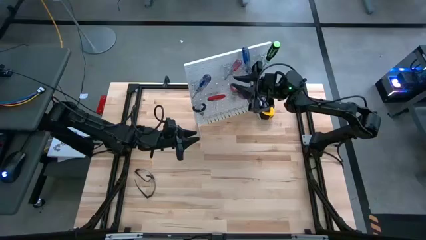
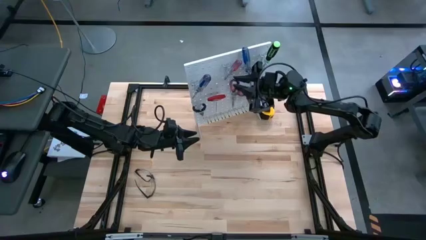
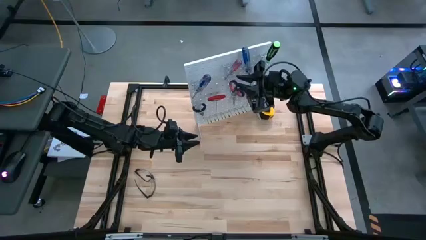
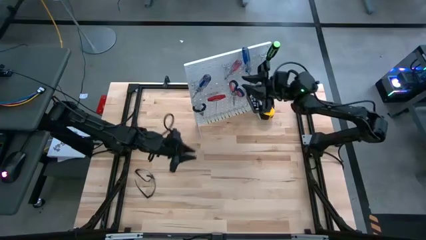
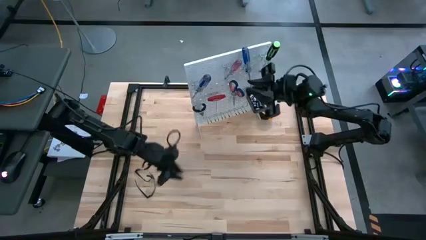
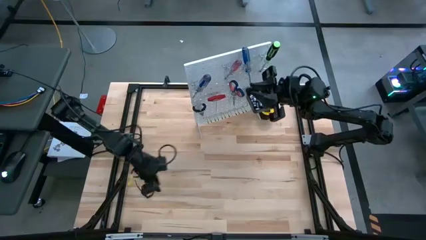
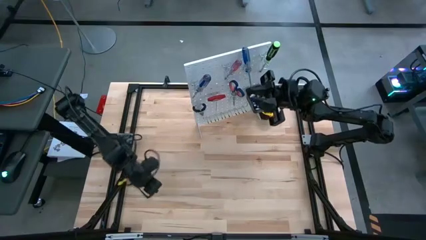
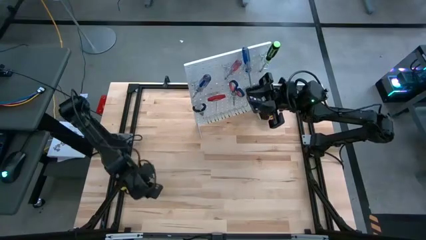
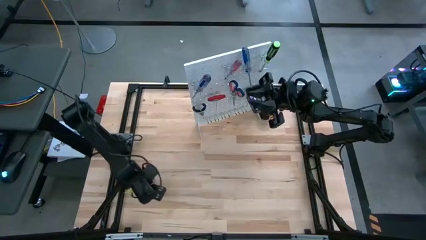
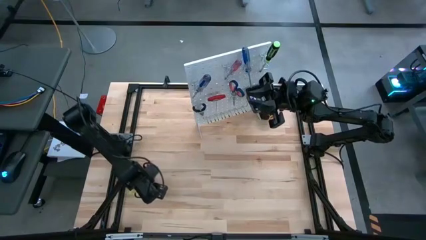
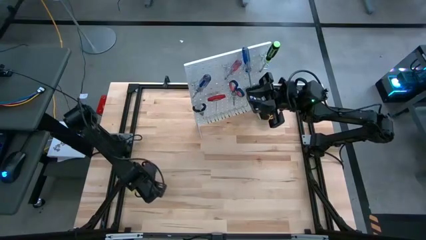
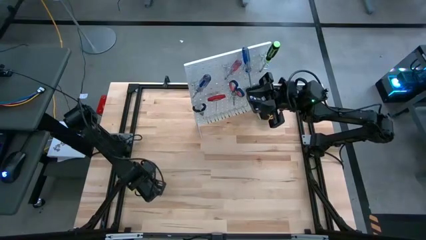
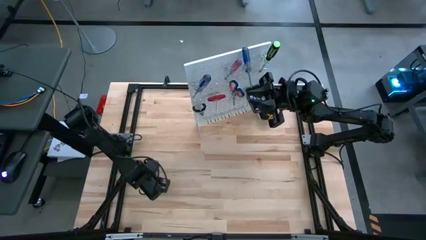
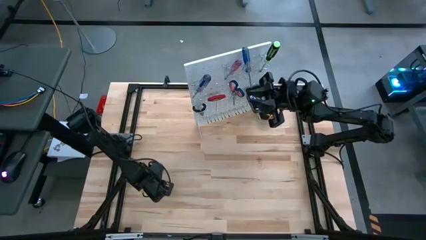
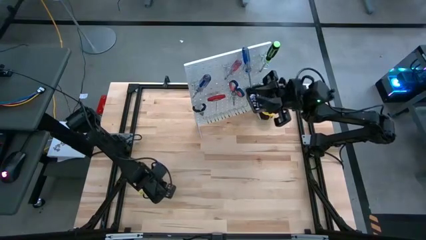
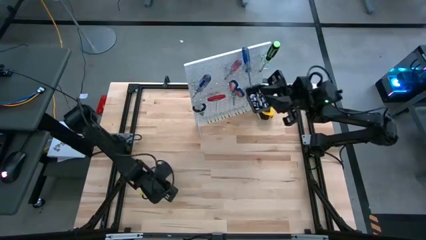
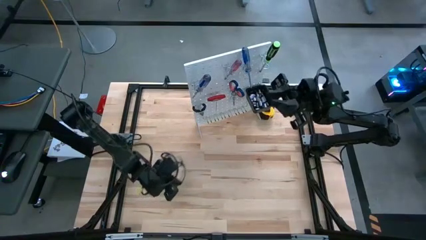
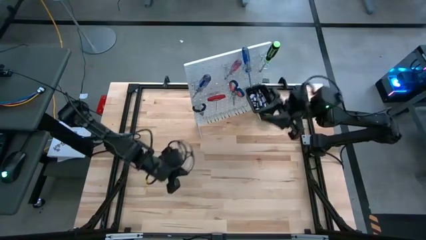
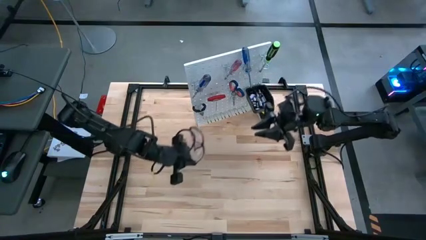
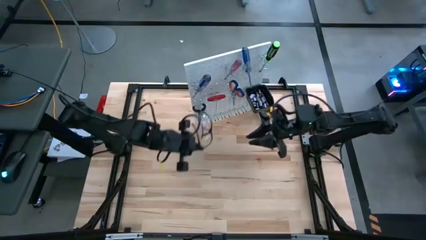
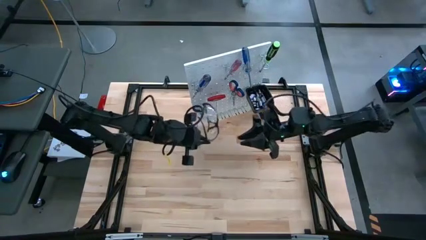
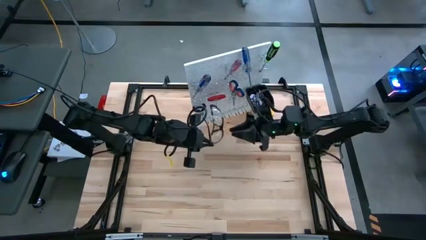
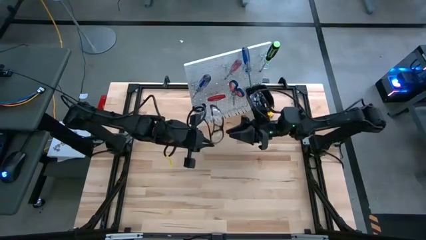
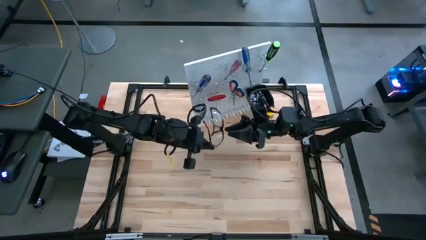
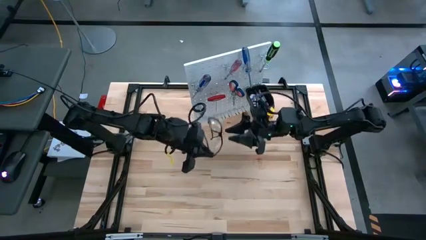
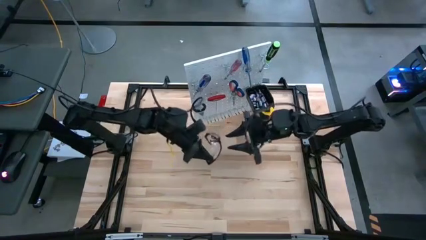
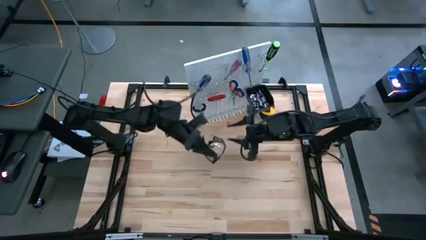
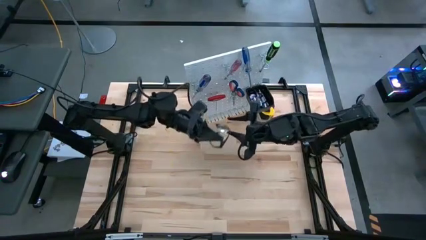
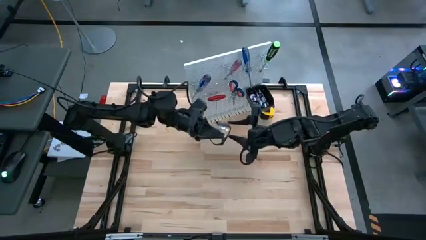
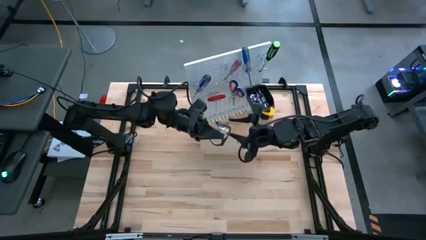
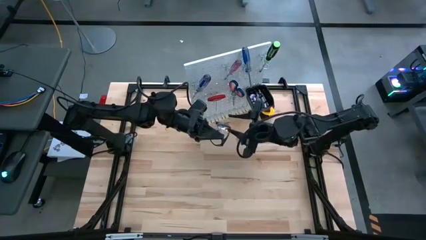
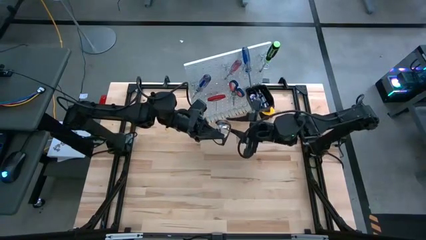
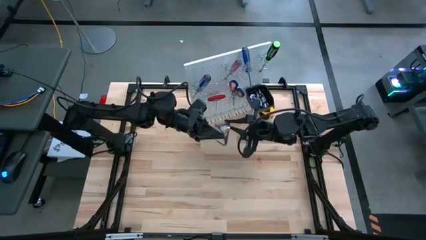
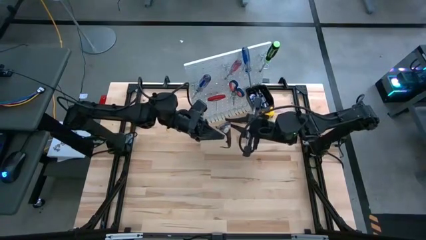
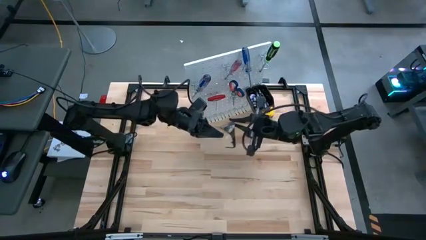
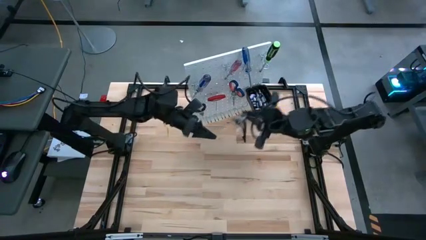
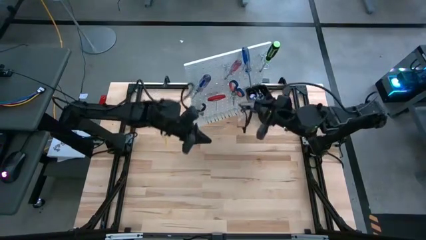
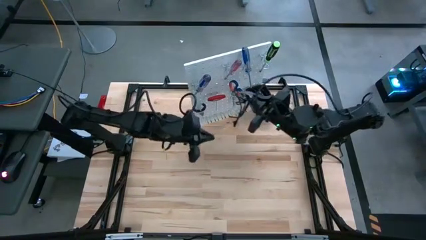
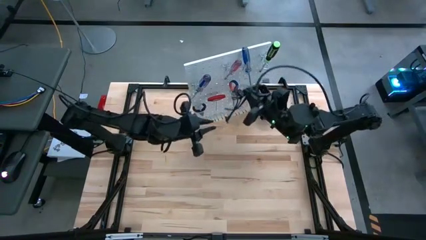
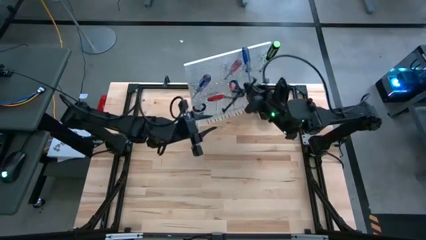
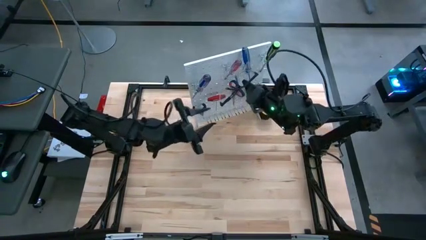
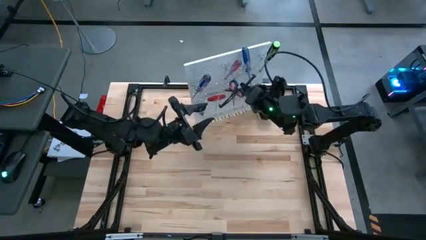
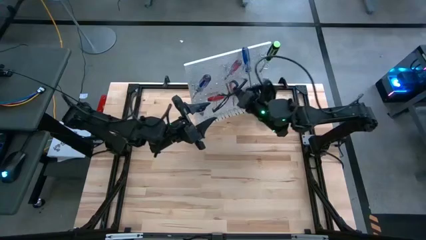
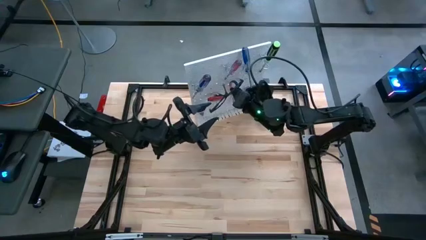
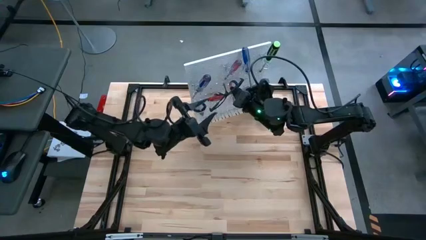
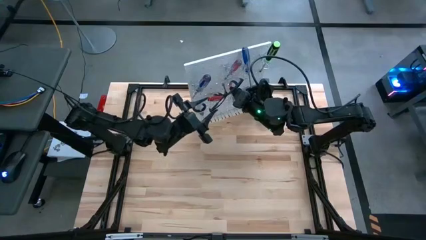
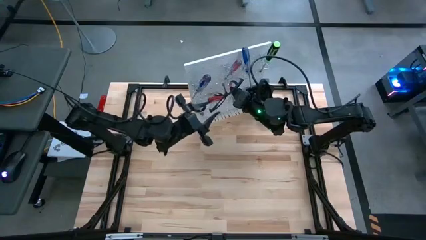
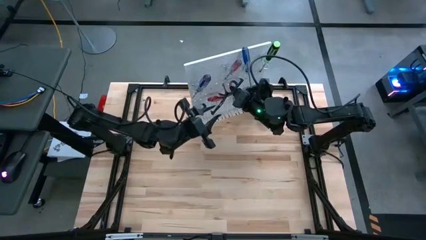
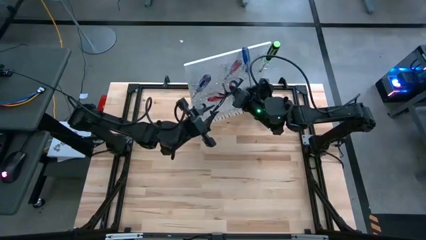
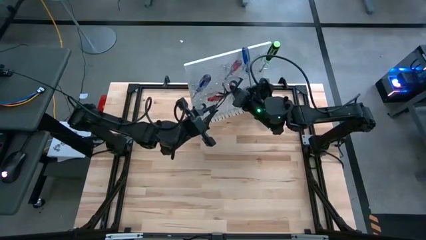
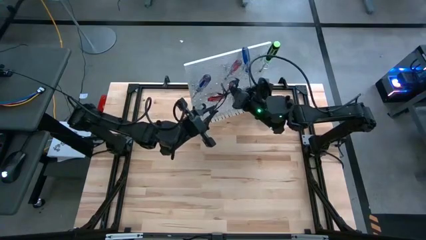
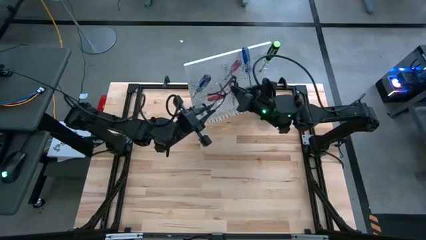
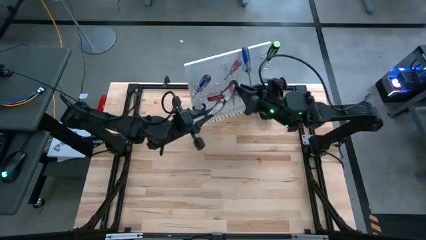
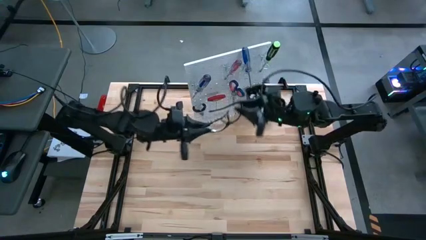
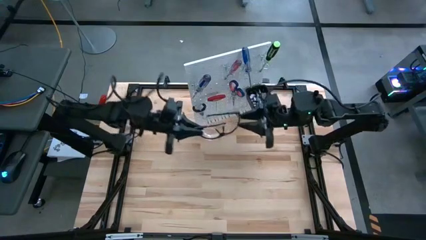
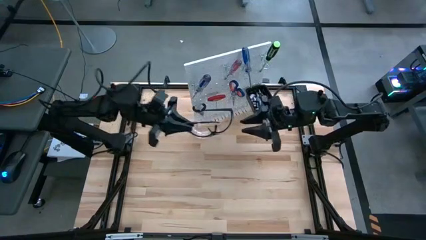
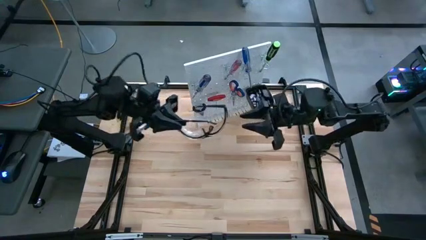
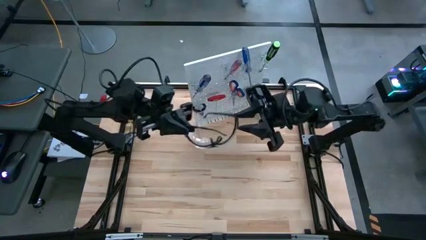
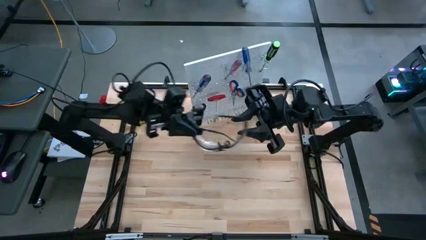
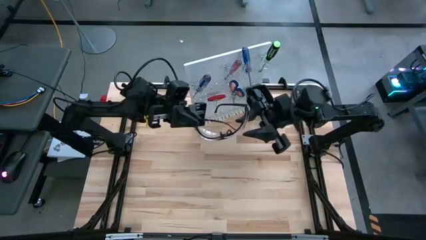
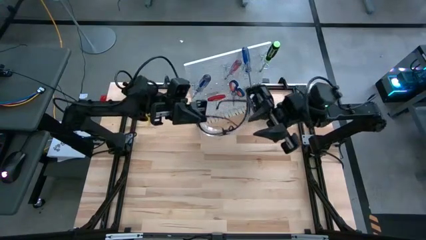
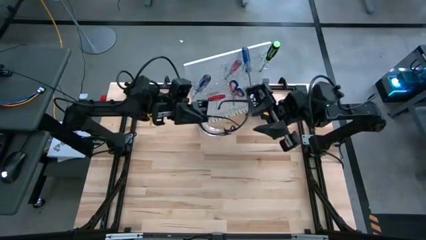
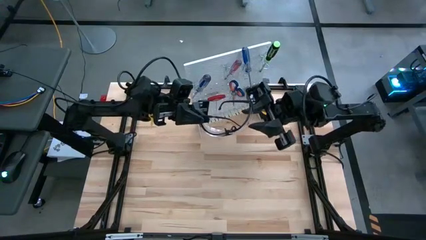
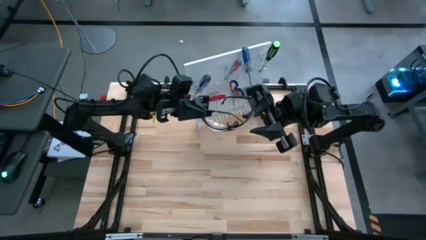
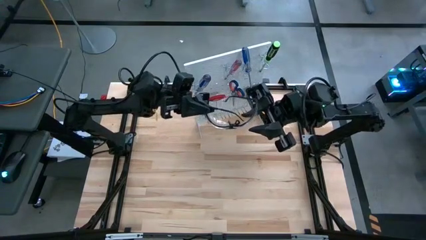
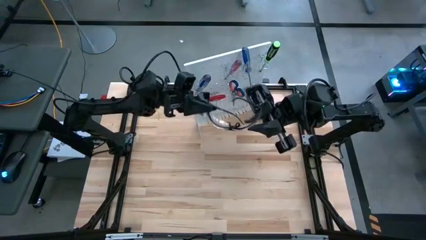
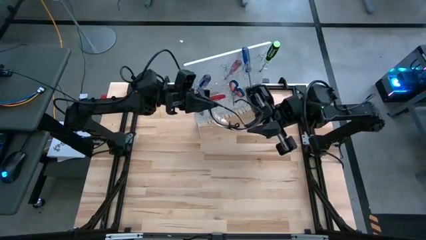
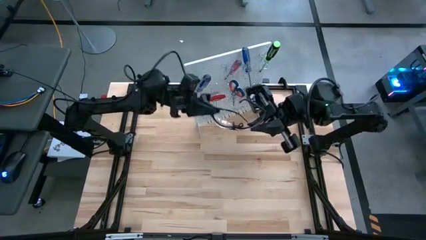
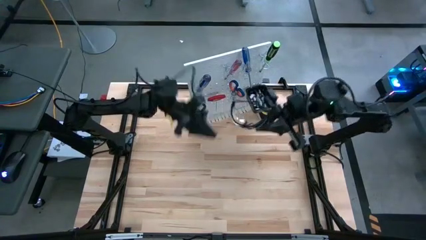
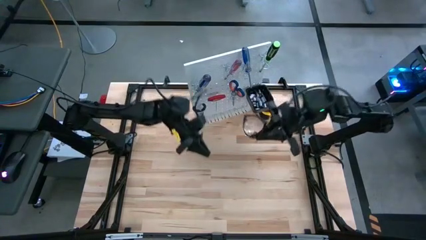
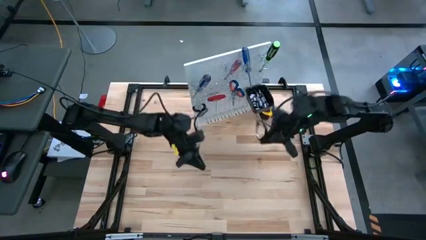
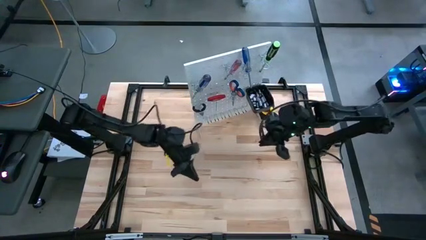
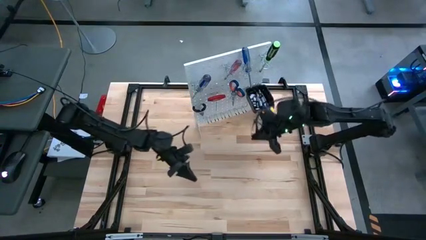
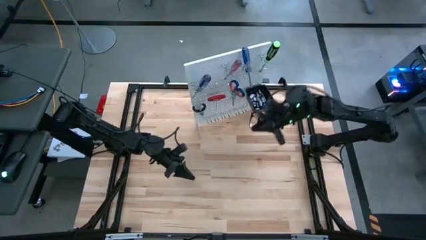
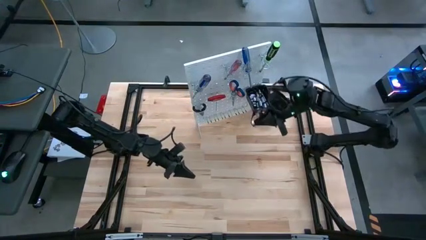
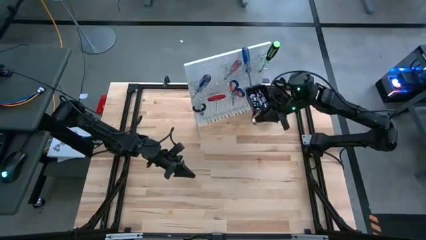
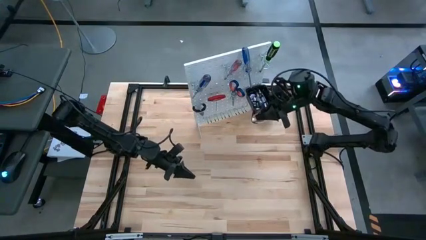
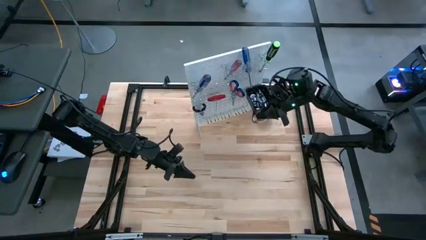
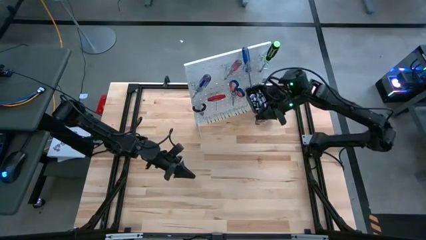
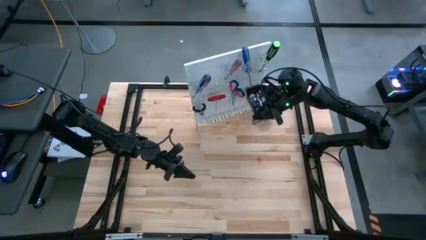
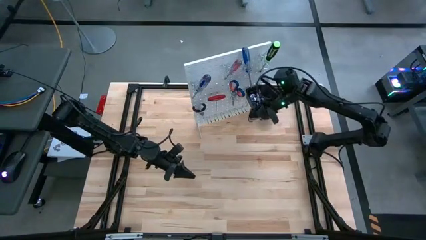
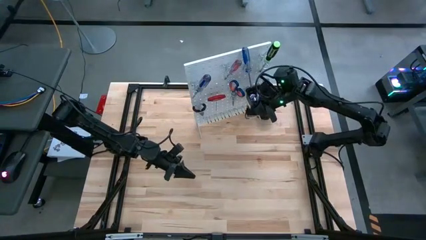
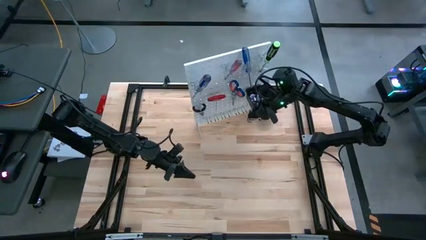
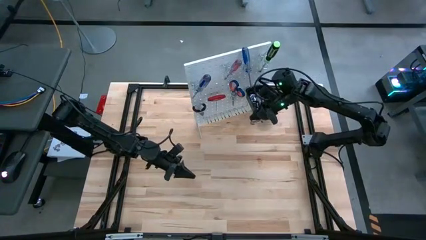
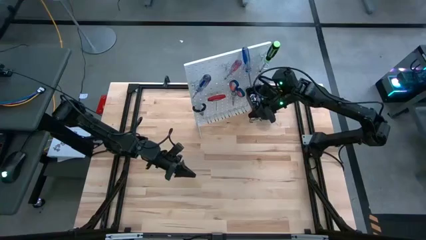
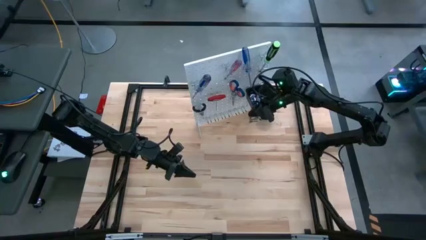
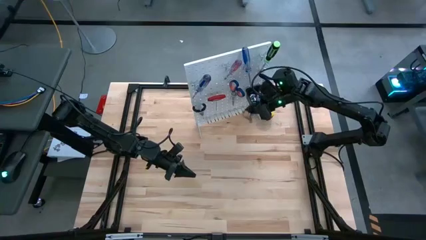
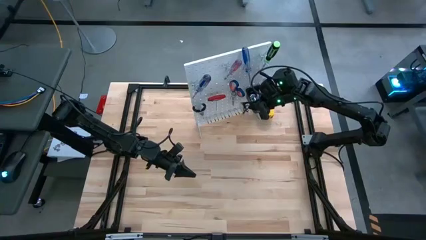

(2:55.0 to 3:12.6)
Task: Hang tools onto peg board
Hang the safety glasses on the peg board
